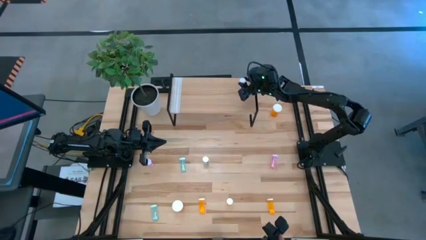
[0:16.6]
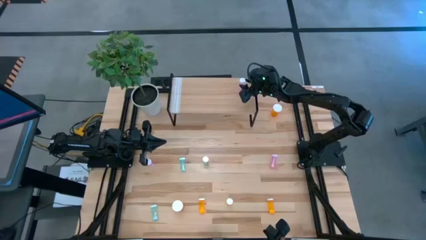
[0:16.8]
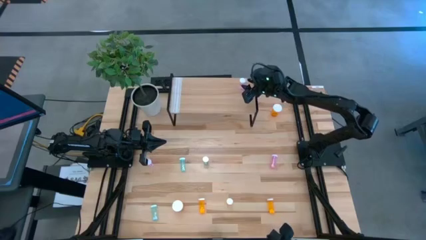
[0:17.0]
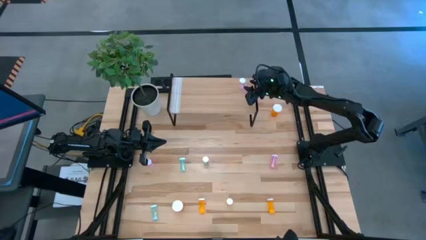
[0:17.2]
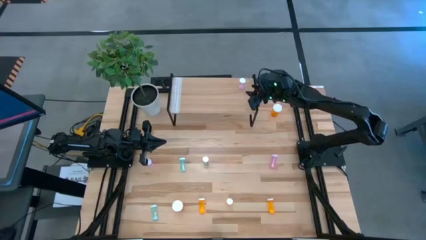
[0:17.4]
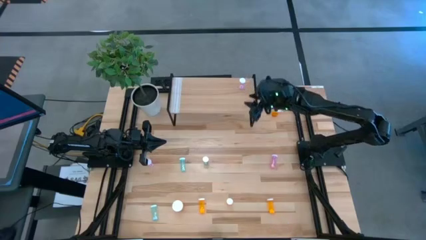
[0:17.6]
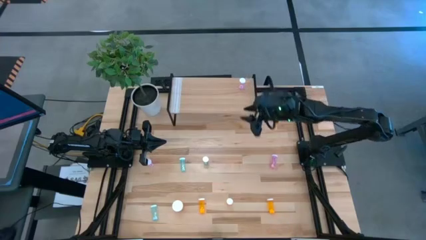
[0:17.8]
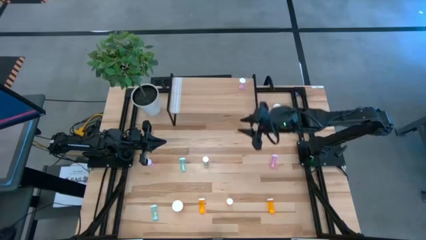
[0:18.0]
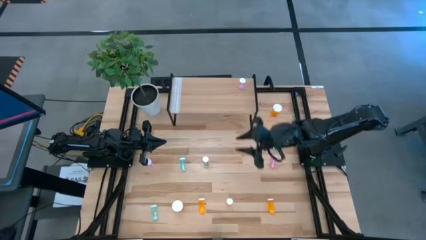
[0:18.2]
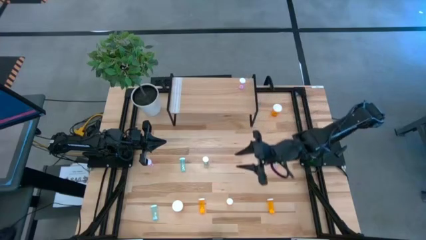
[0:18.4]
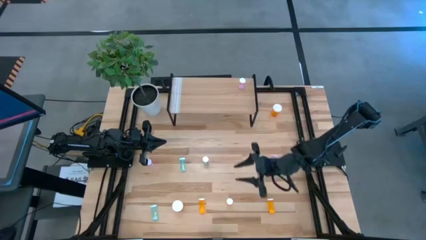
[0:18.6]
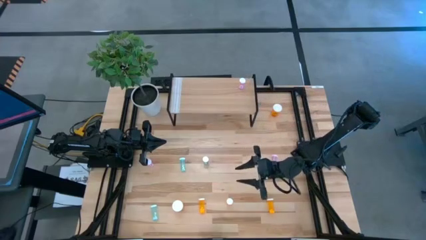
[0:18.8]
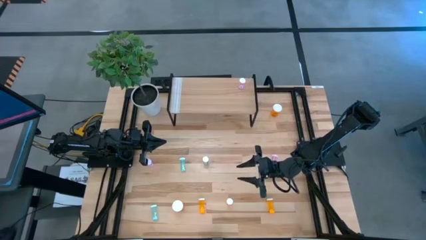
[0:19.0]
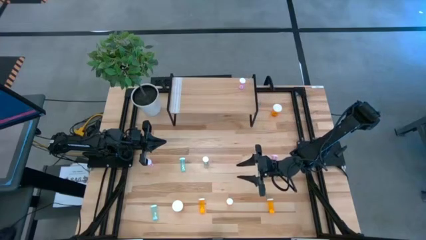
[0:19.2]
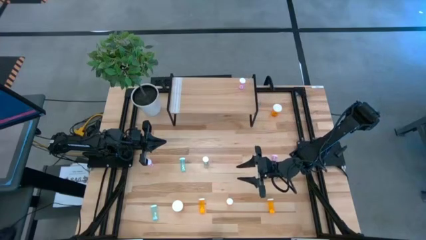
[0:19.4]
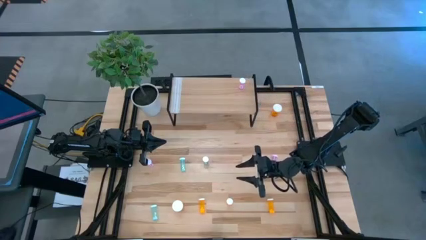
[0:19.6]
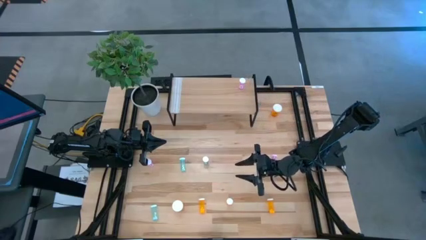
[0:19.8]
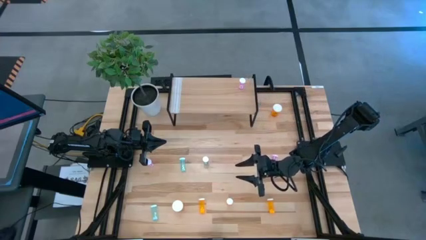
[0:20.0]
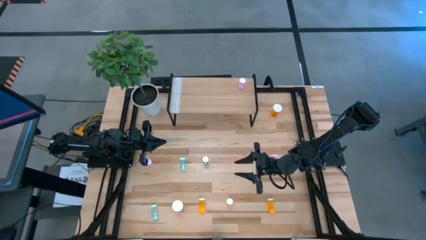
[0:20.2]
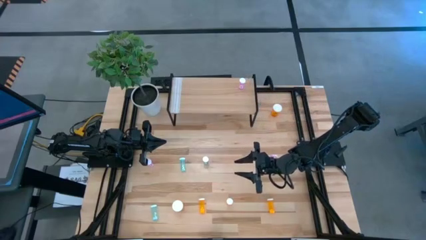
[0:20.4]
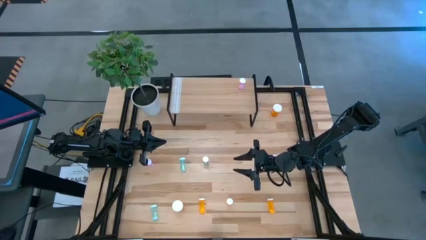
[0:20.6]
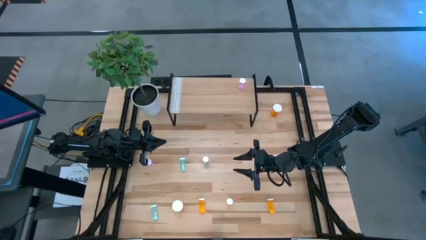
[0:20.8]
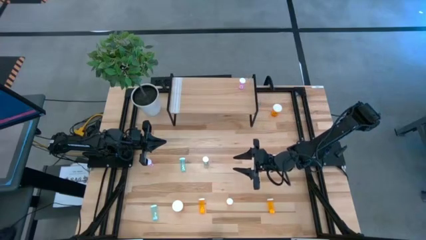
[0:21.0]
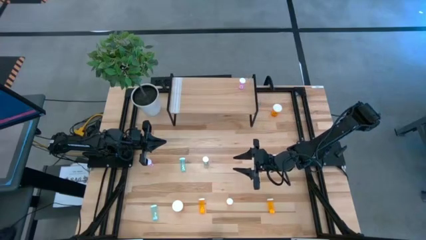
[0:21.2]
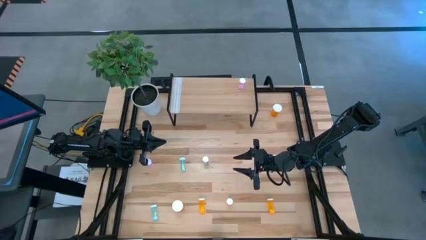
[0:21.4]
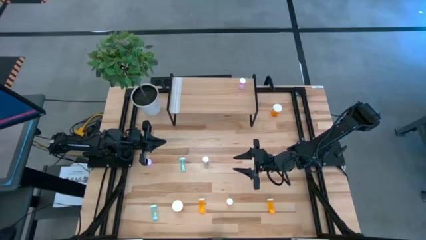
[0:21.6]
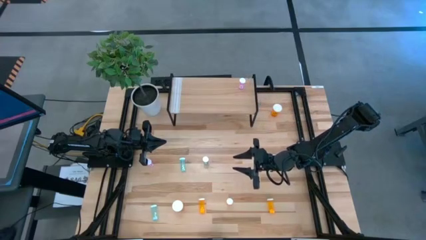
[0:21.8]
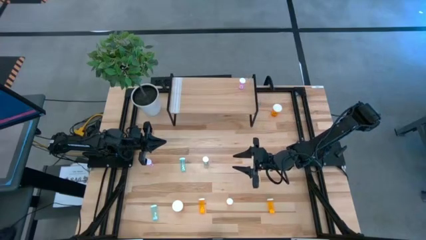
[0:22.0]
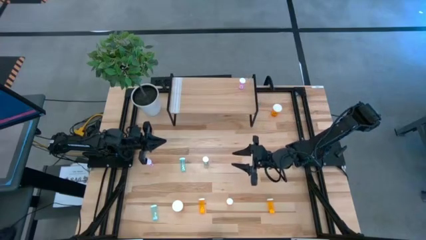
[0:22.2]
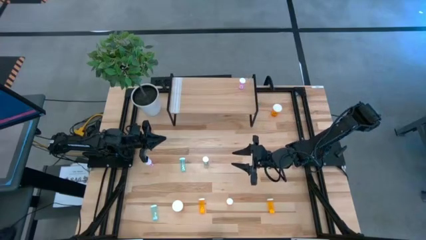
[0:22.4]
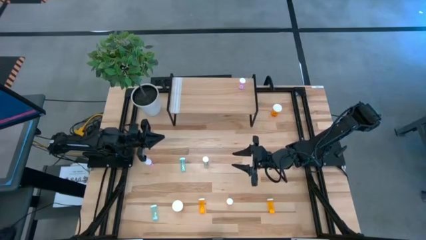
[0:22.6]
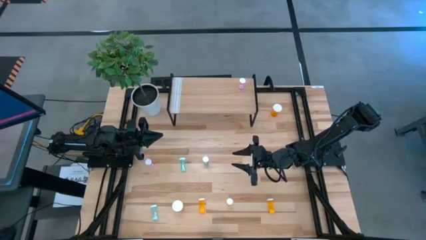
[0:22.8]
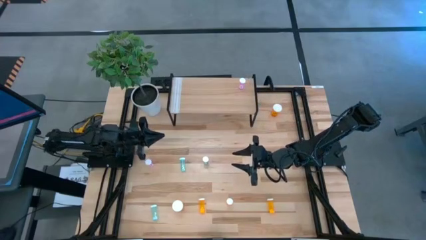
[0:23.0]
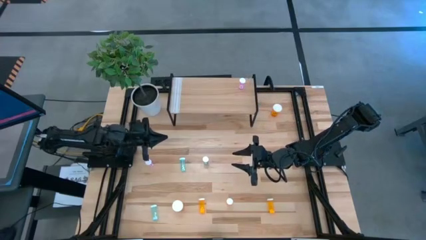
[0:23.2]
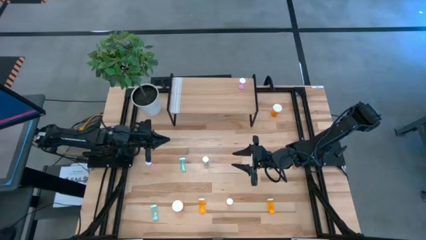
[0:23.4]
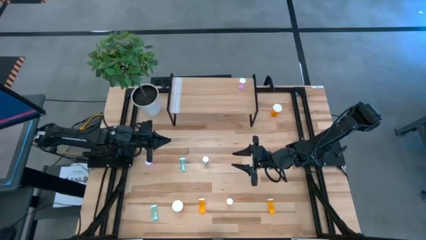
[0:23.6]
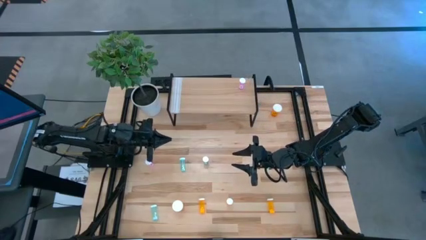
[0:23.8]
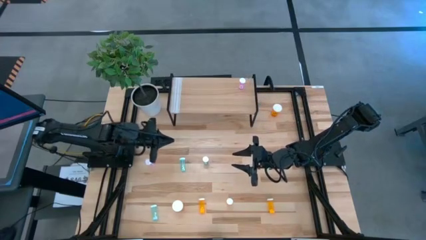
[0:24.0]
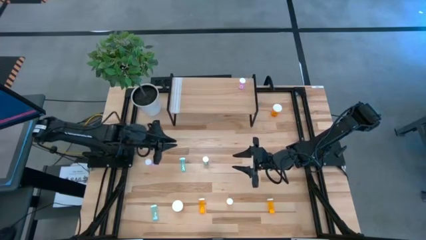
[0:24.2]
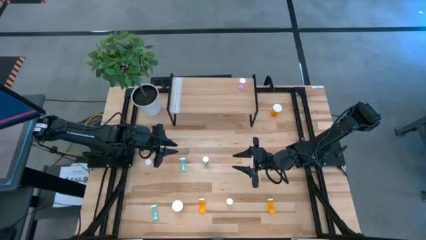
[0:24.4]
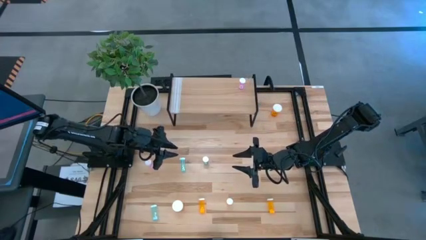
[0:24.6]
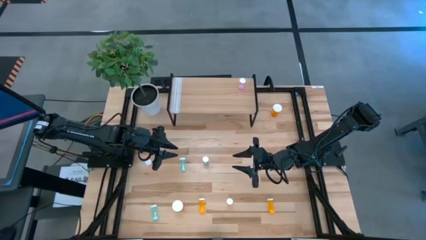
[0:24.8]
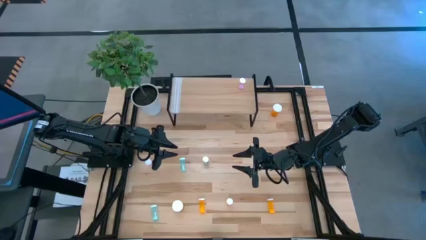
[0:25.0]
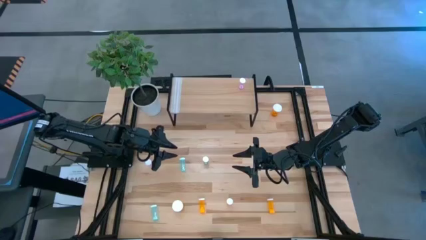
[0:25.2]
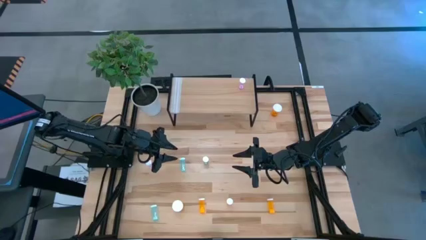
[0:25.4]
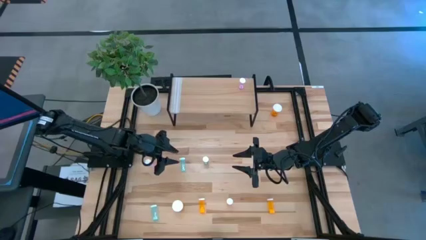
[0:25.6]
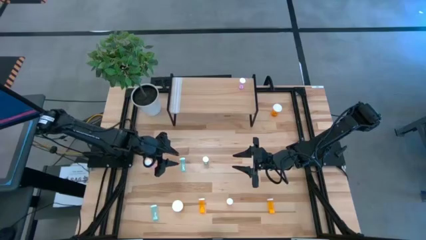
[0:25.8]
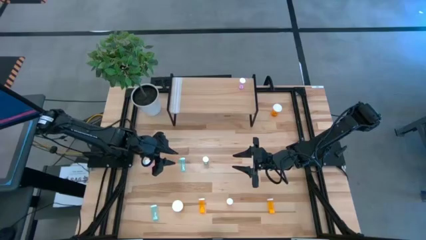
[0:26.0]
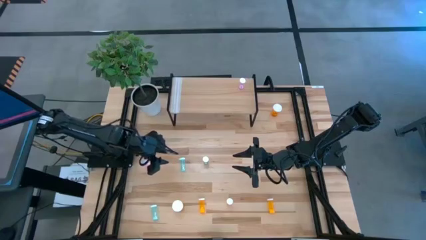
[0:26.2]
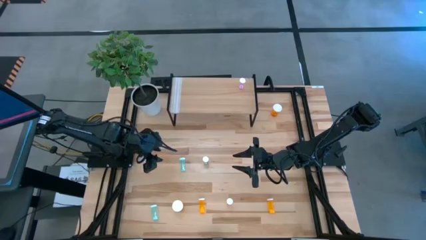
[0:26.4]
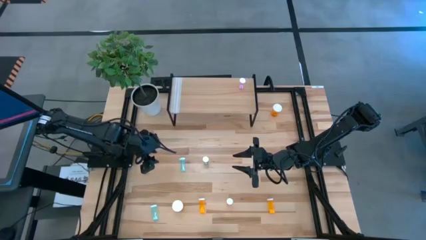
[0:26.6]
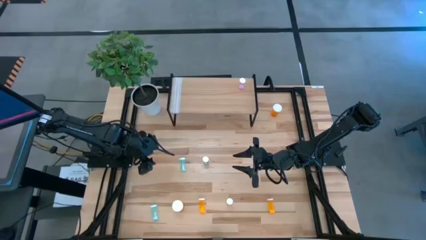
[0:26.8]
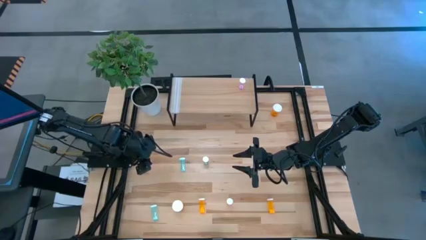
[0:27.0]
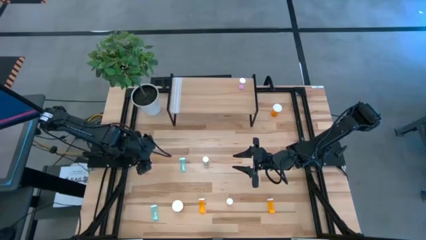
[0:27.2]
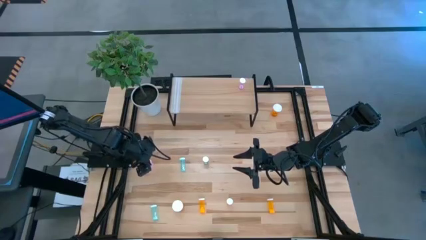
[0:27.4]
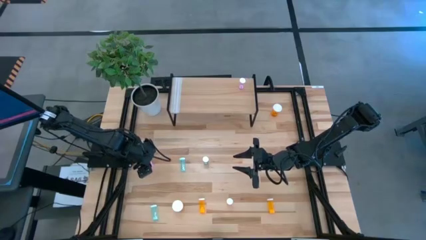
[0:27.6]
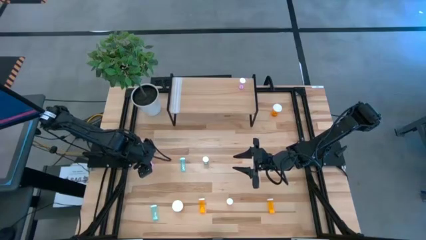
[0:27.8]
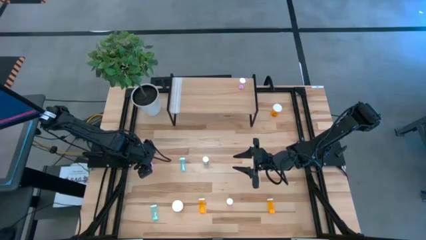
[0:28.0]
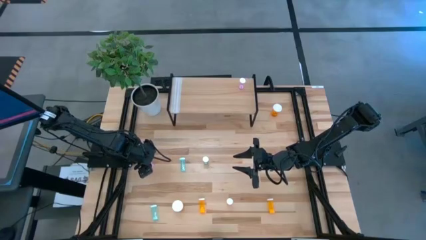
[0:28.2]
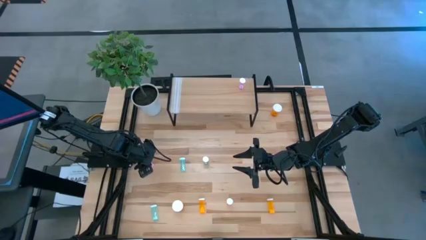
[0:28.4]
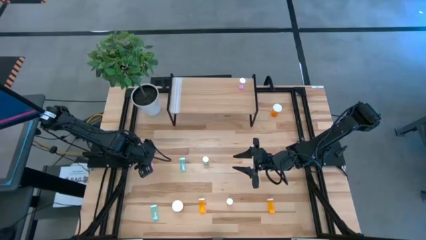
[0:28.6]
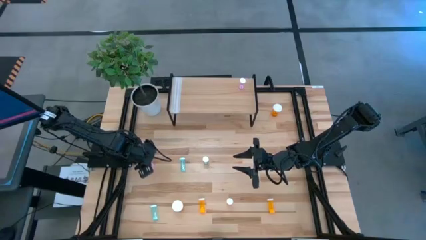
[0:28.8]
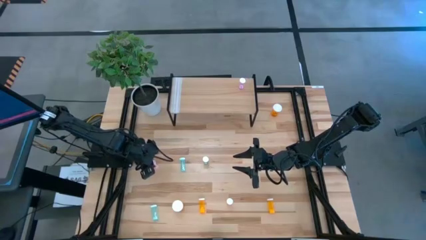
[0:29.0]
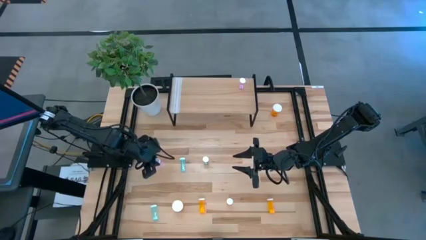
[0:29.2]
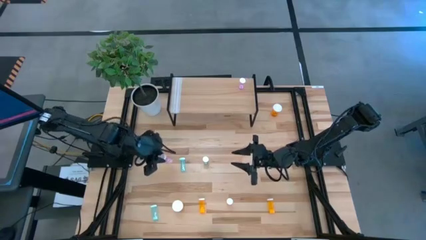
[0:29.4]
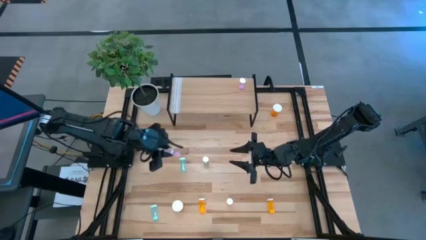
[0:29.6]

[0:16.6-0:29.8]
Task: Pick and place medicine bottles onto shelf by color
Put the left pink pill bottle on the shelf aligned with the other pink pill bottle

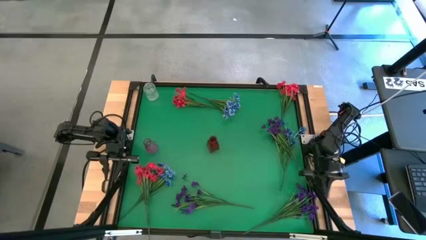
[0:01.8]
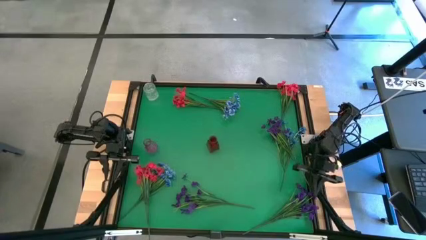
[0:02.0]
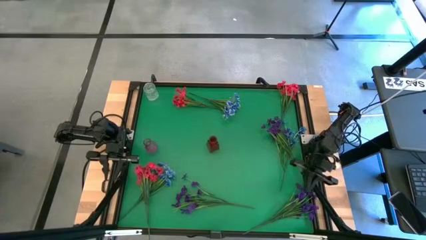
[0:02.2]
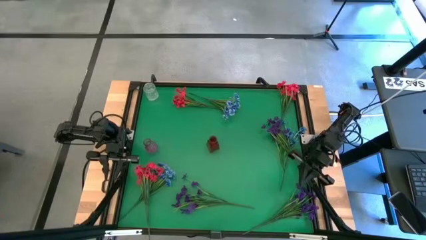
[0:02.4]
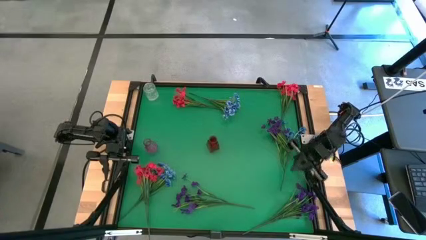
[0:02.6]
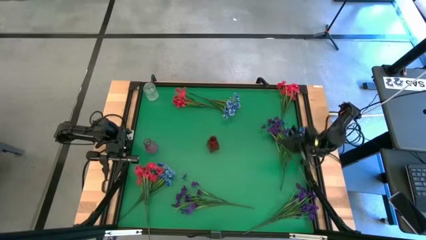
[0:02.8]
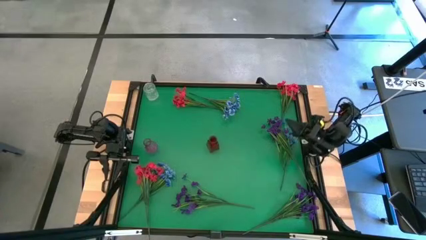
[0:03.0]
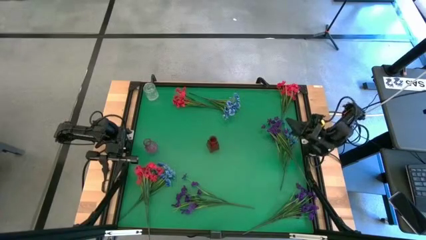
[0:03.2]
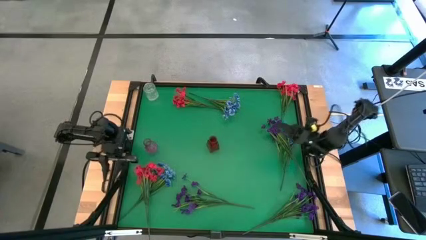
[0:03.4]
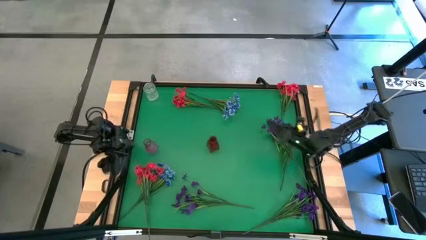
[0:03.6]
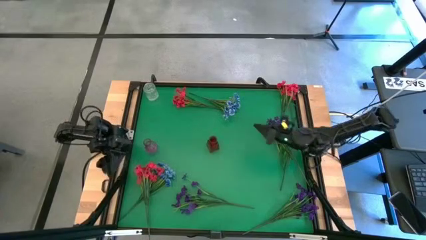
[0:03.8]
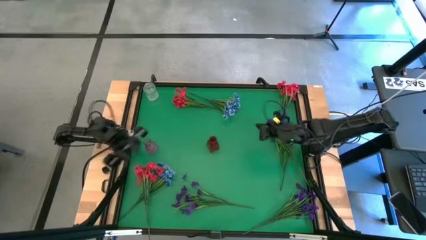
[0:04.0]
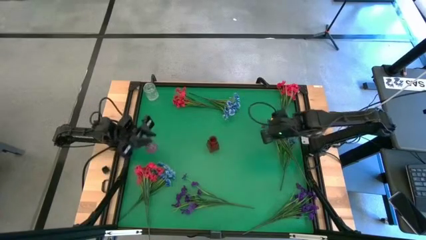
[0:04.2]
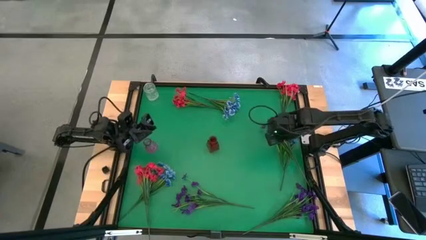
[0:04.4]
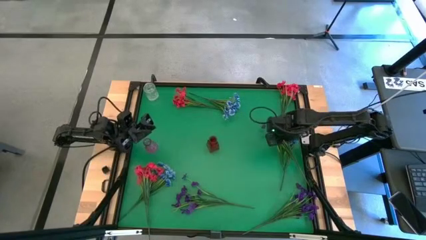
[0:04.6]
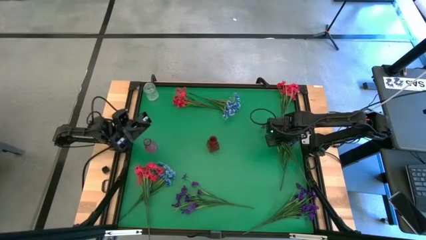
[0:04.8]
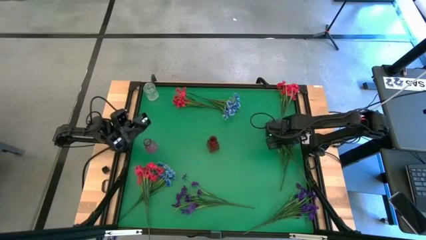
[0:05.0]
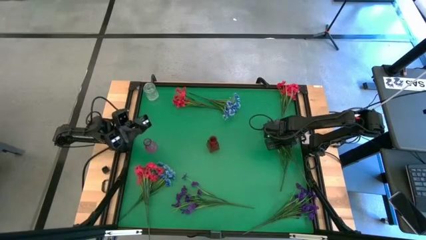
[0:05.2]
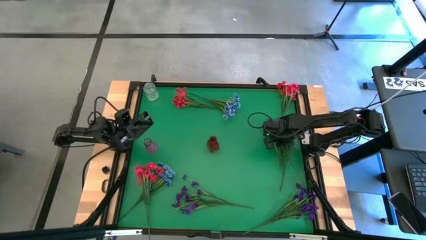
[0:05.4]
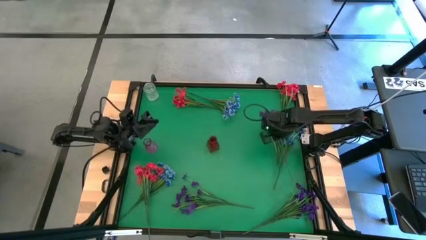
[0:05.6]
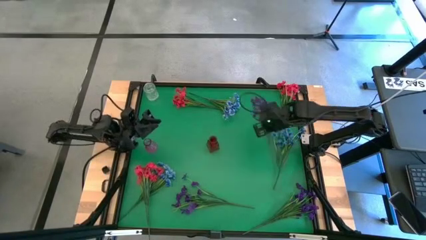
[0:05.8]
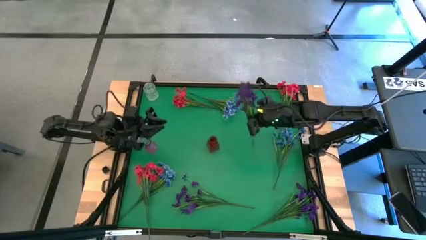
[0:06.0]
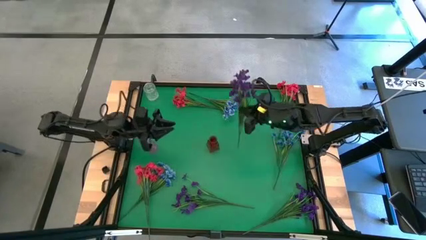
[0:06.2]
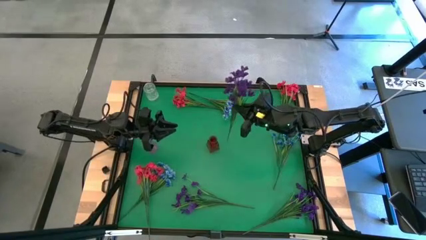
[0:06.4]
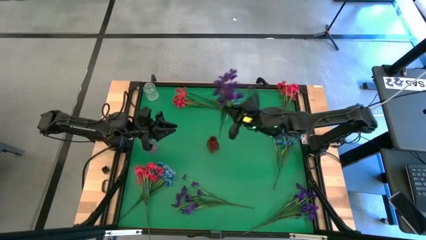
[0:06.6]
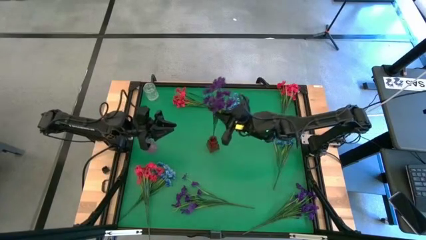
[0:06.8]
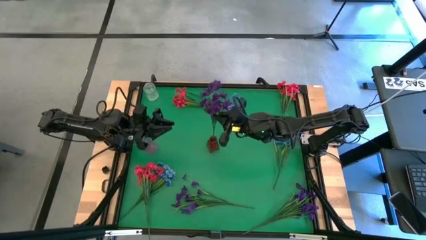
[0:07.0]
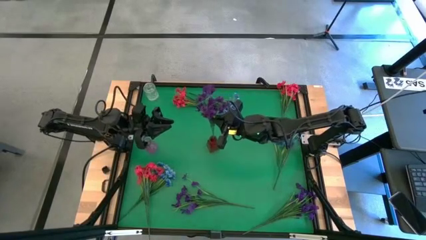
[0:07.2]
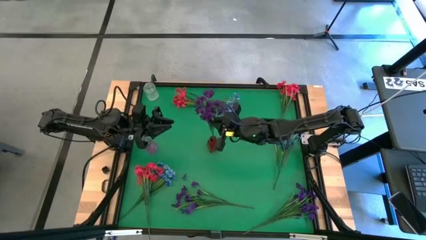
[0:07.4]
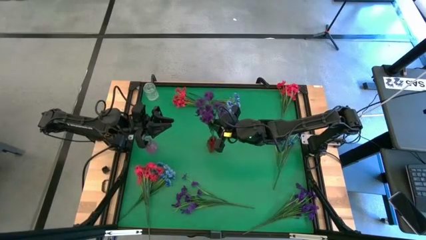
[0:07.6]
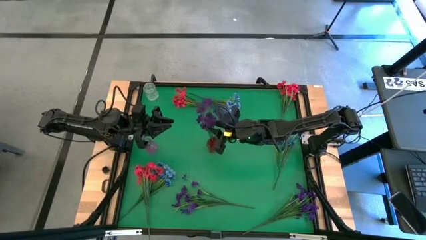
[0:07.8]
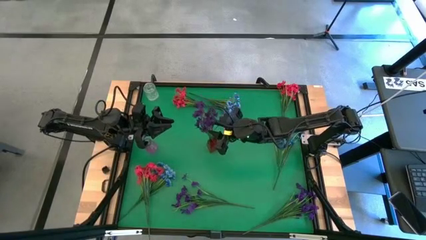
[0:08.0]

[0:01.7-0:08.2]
Task: Sort flowers into vase by color
Put the top right violet flowers into the red vase
